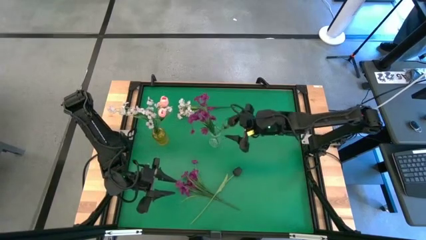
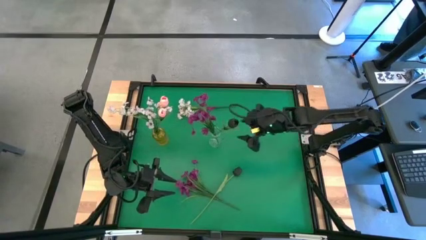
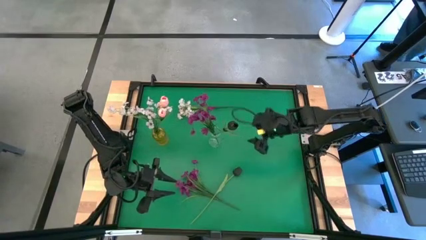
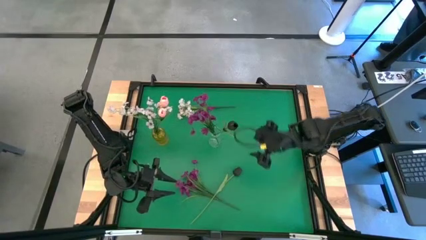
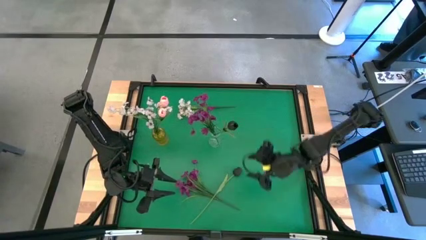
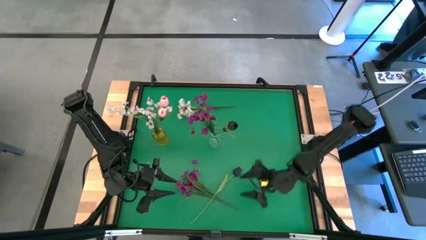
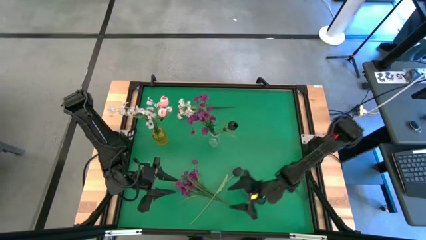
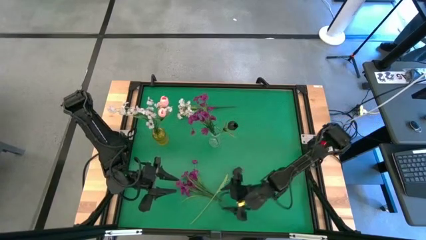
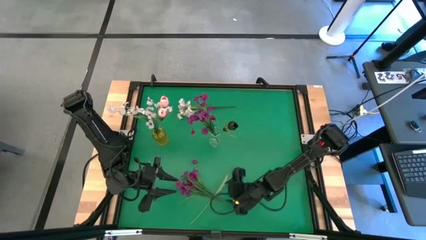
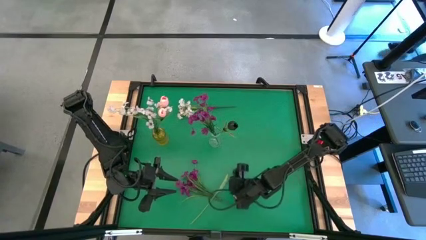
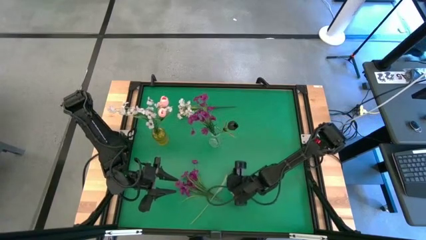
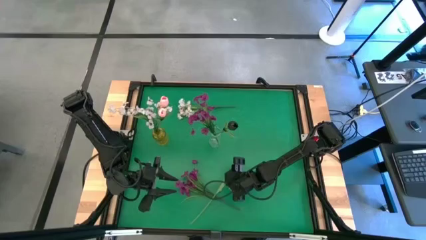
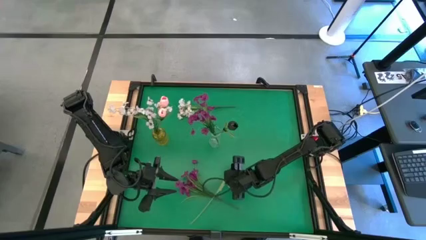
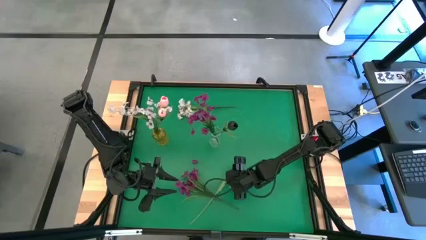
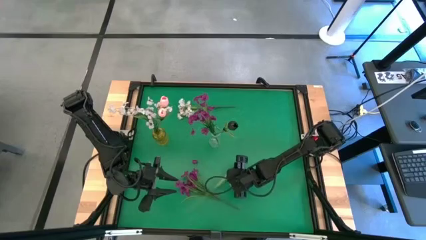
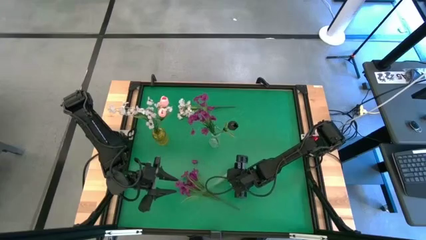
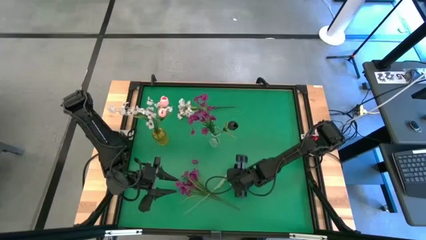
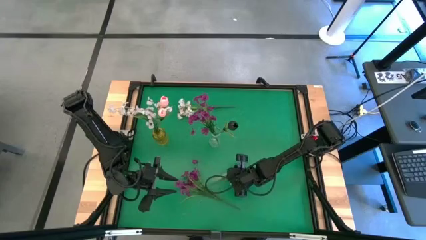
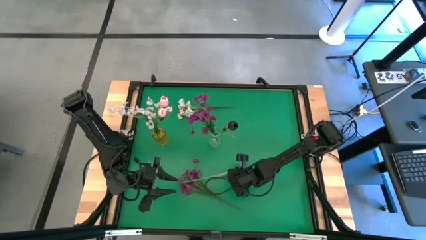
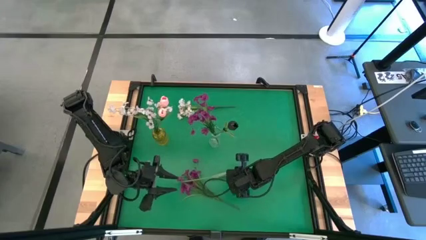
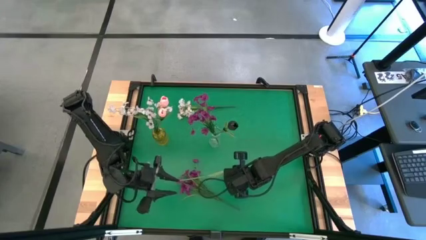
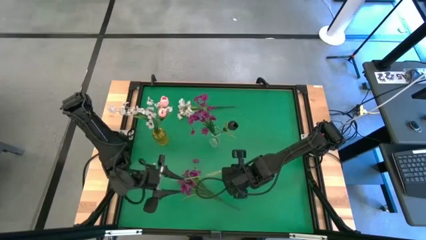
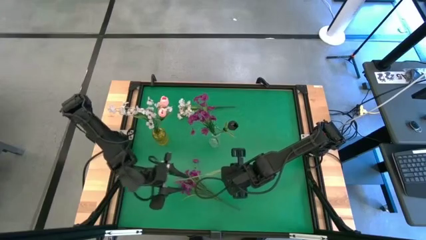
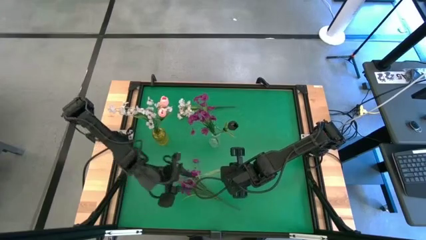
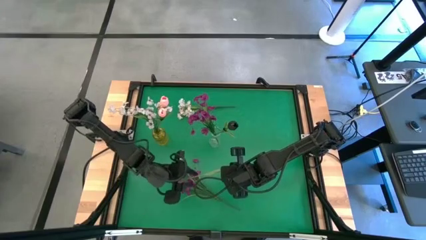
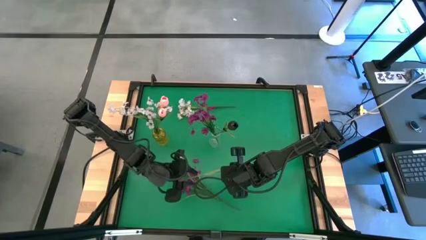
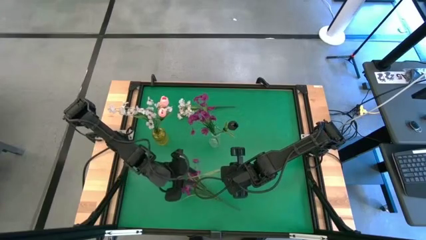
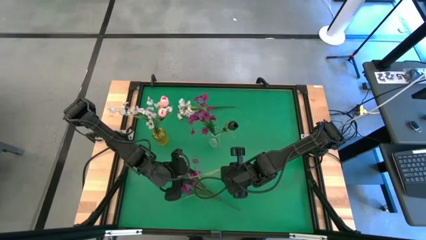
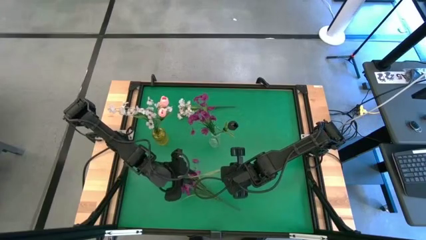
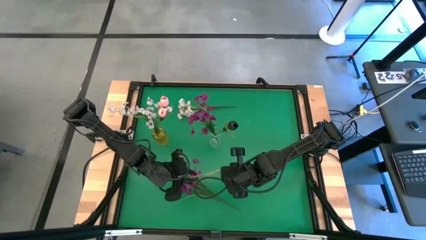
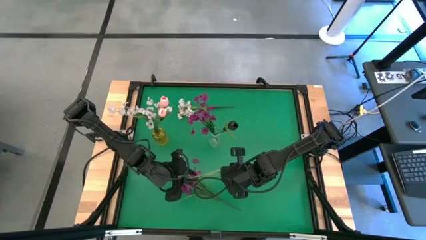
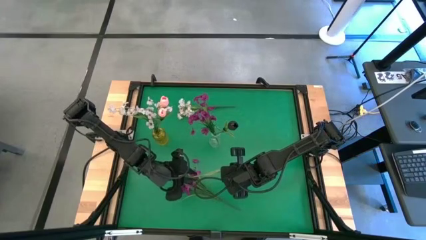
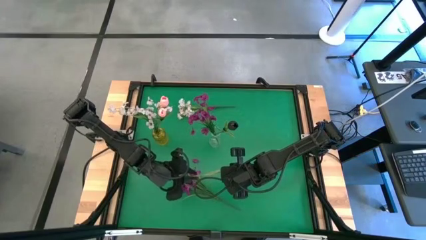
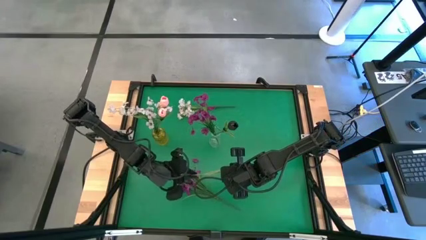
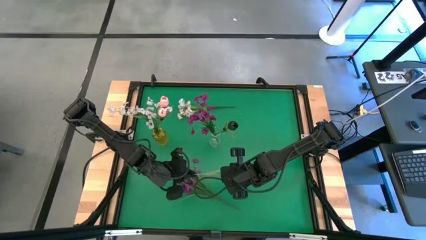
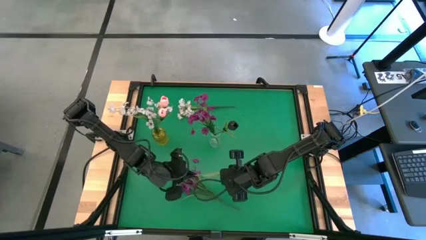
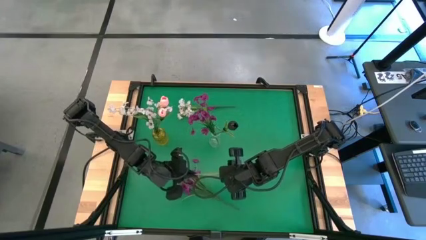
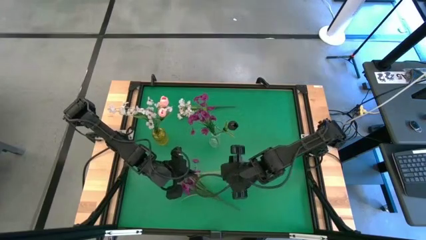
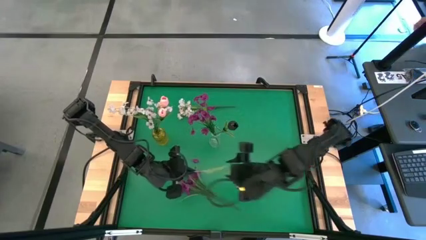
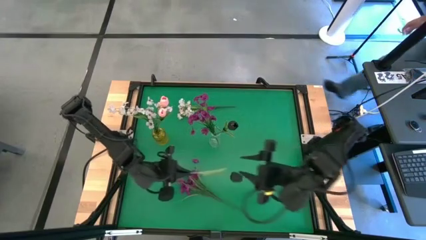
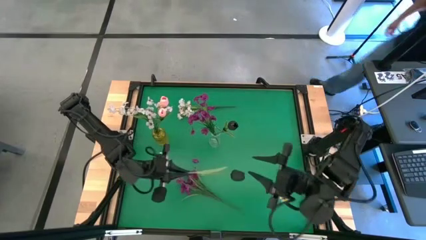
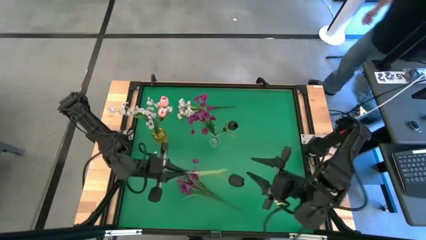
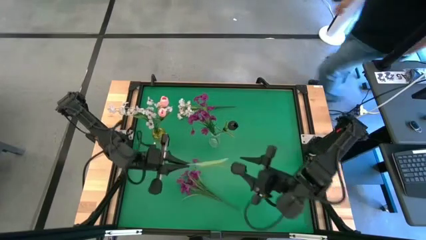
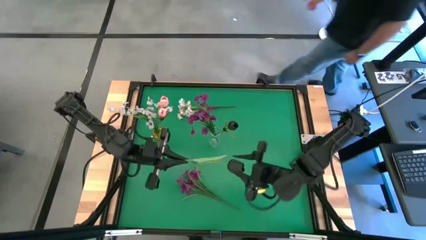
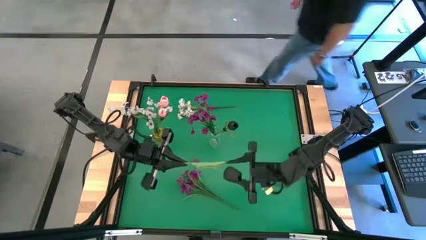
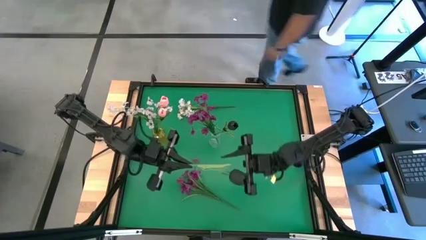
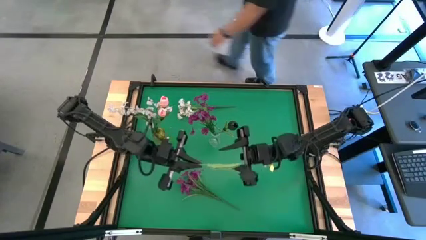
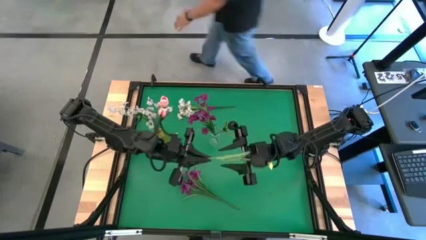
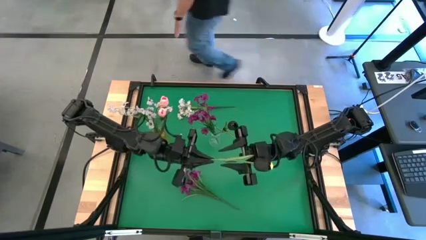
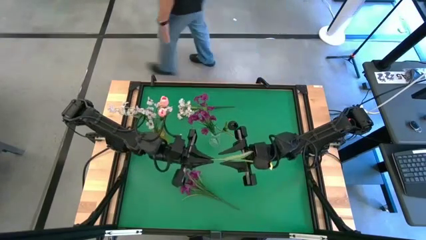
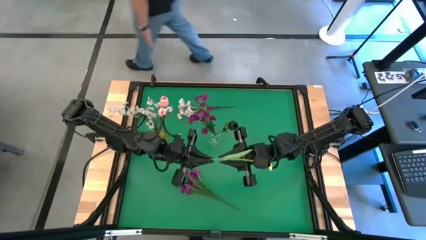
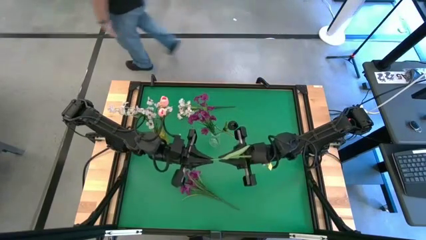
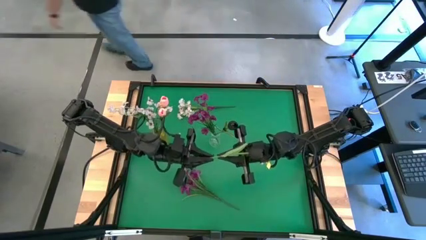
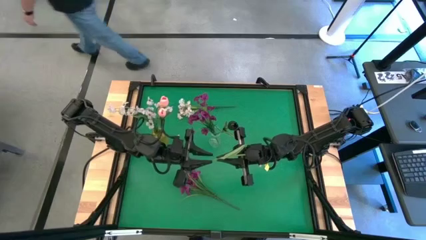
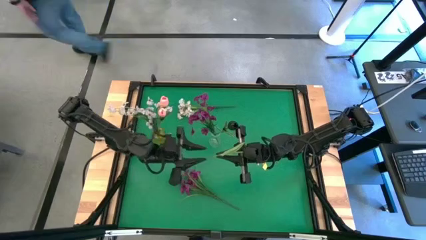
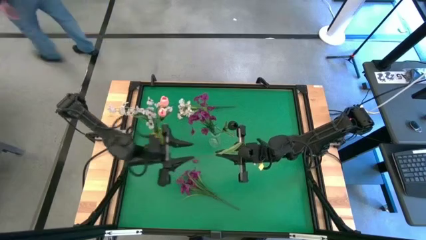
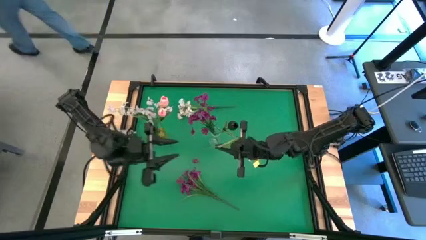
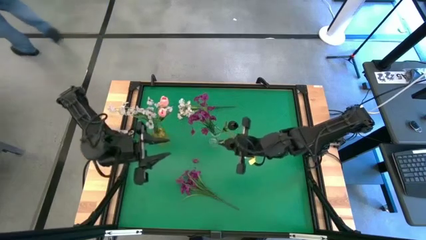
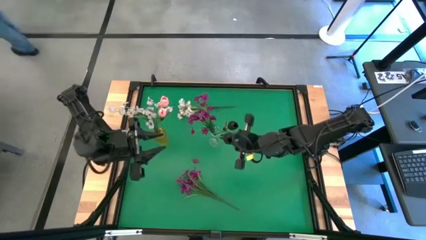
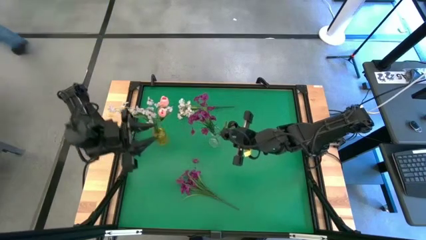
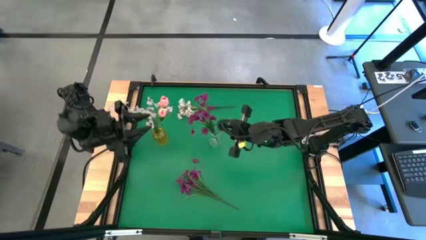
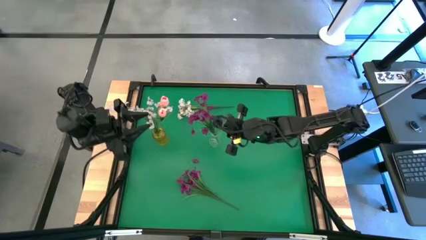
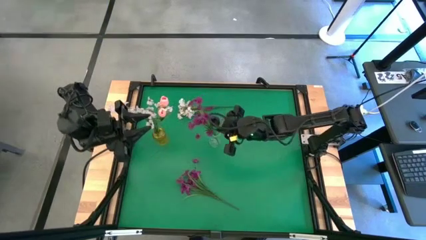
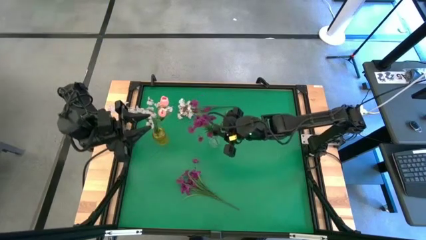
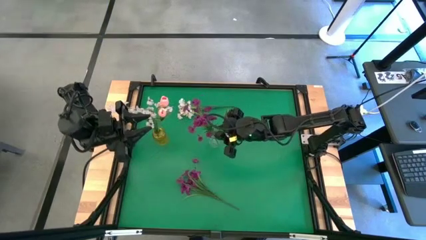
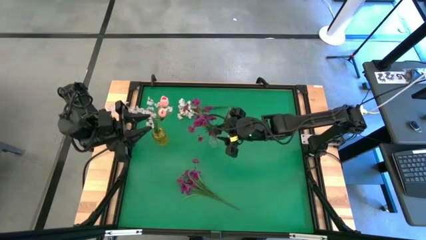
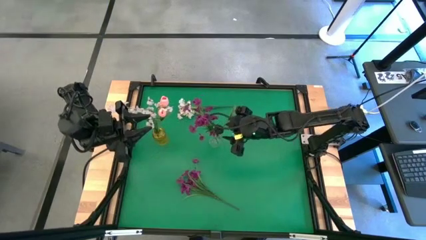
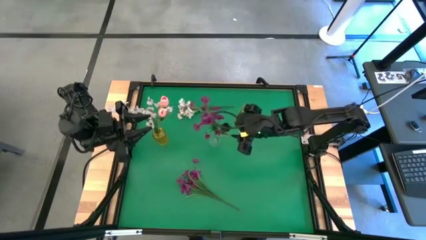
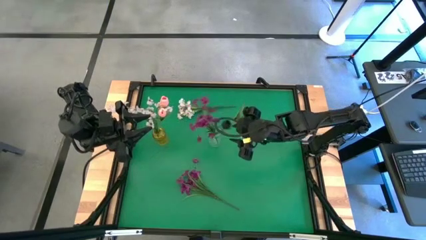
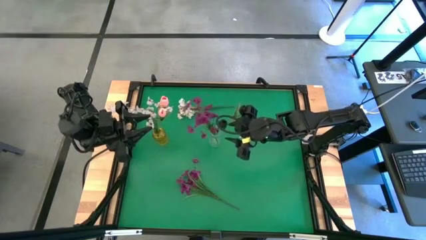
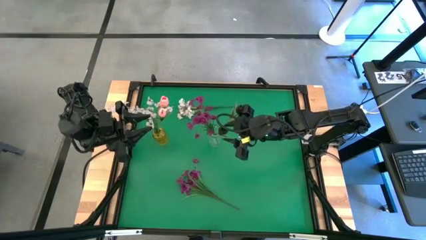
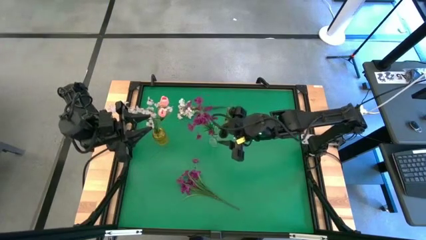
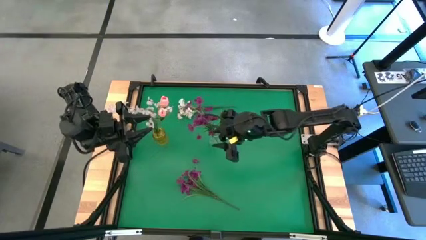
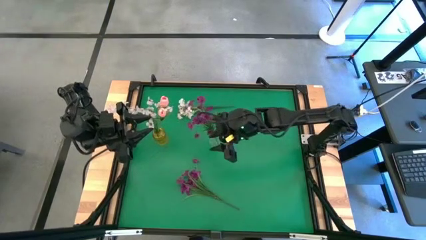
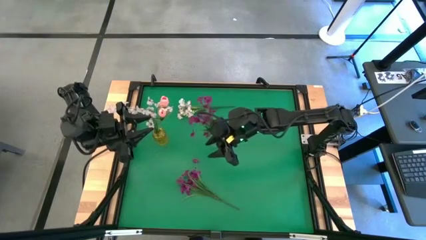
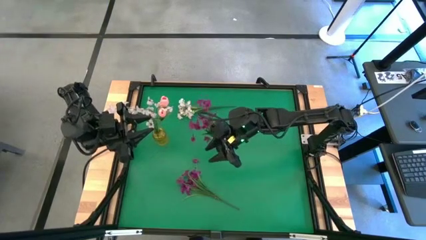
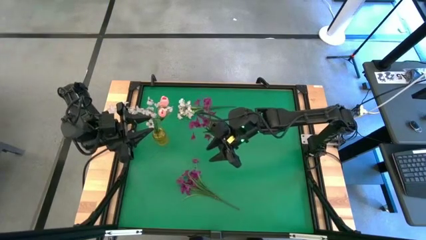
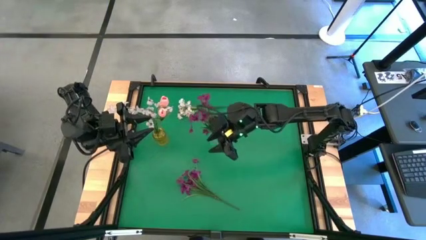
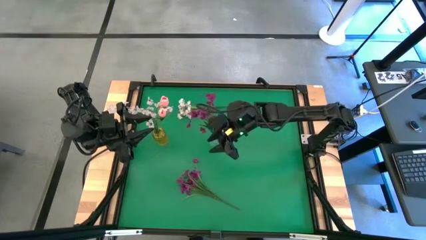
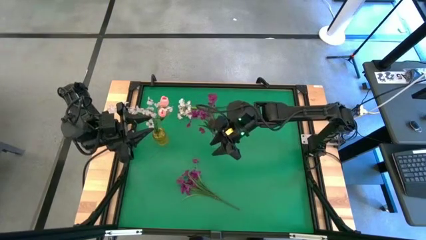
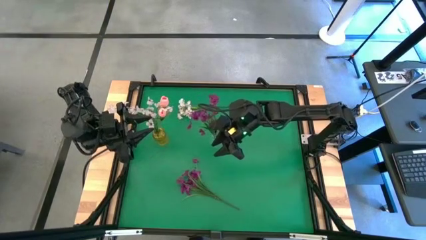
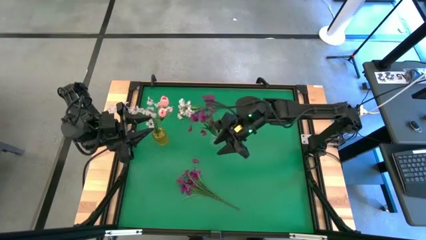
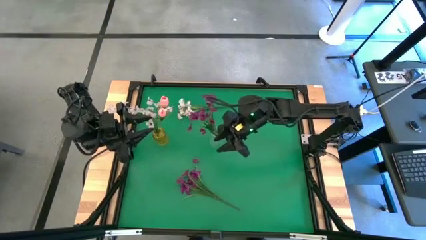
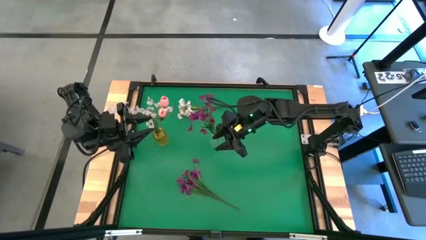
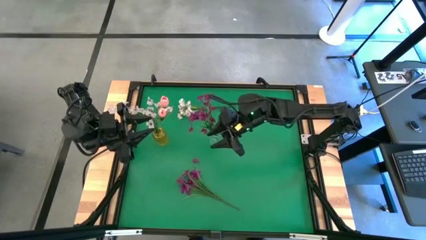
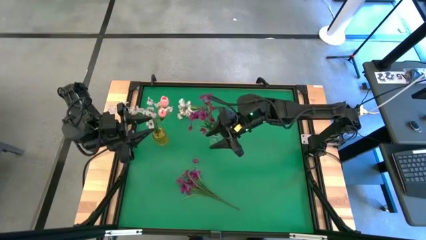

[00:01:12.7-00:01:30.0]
Task: Sort flowers into vase by color
Put the black flower into the transparent vase
